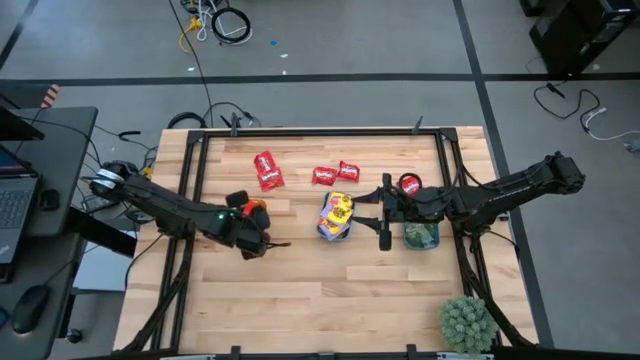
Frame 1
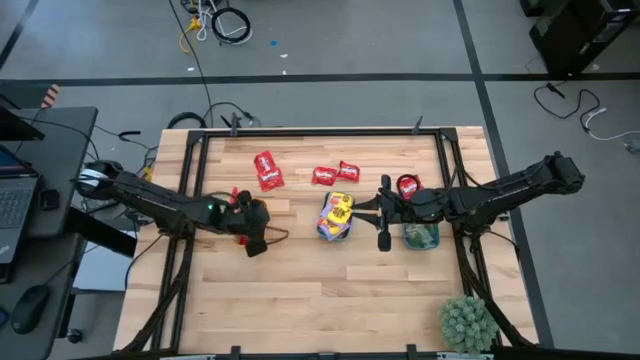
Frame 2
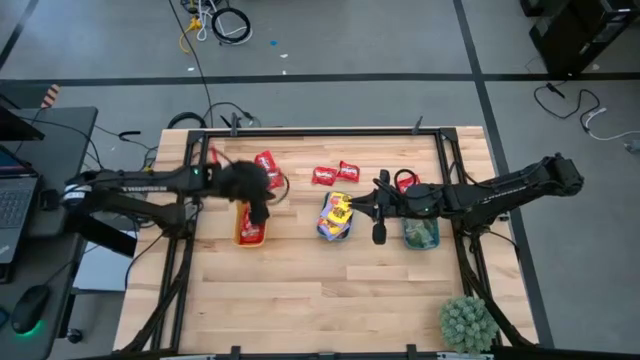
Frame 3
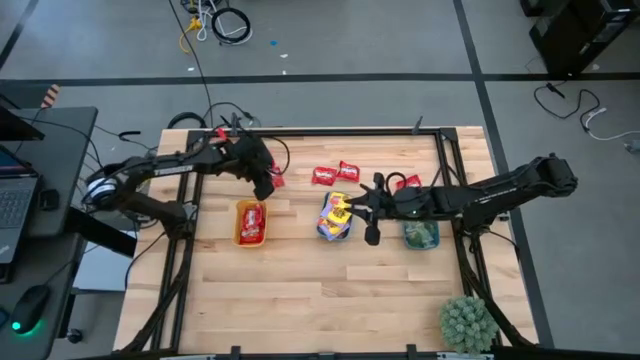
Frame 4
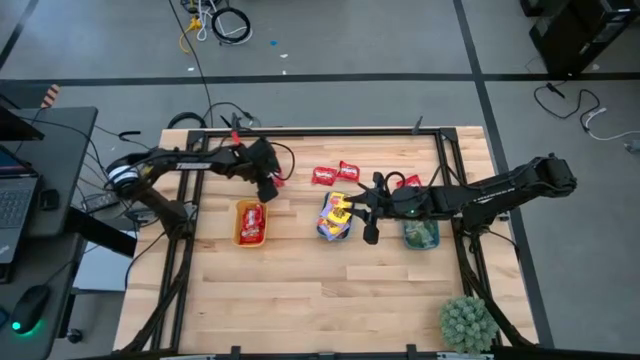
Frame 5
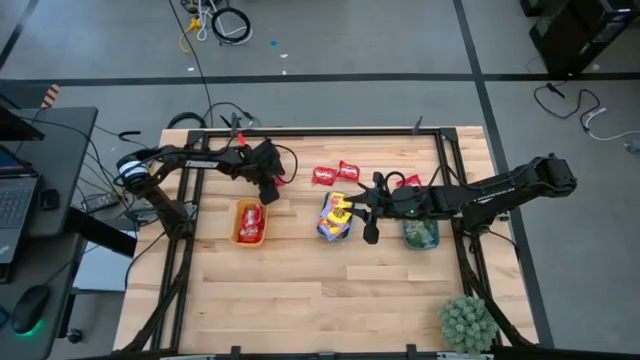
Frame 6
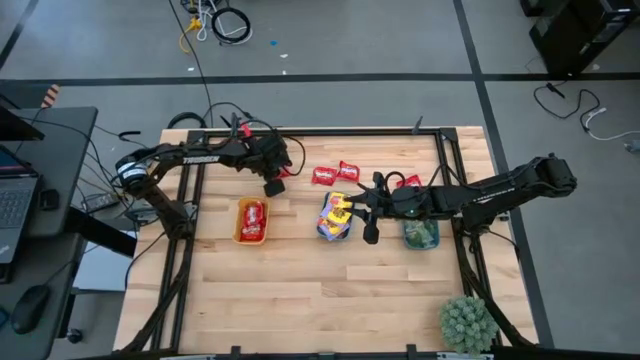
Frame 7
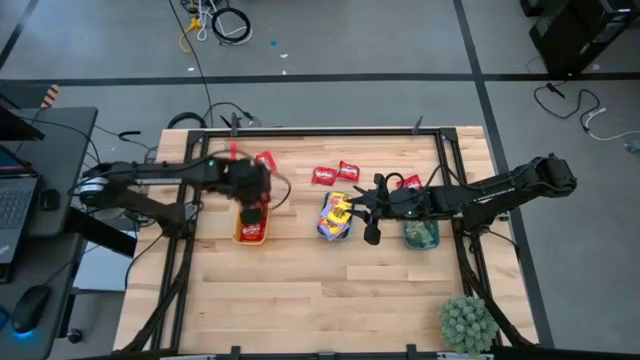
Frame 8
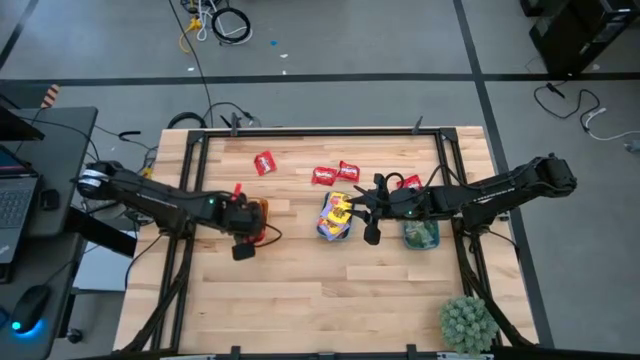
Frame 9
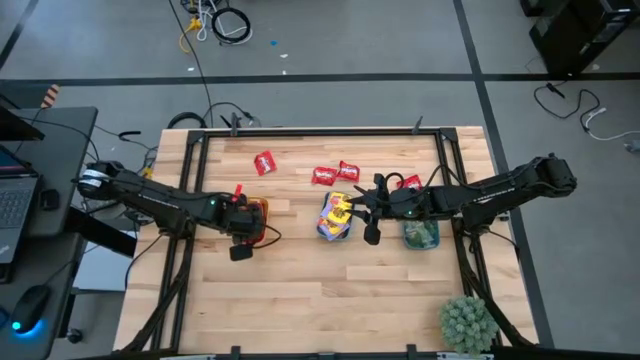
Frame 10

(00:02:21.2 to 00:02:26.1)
Task: Sort candy
Put the red candy pack into the yellow bin

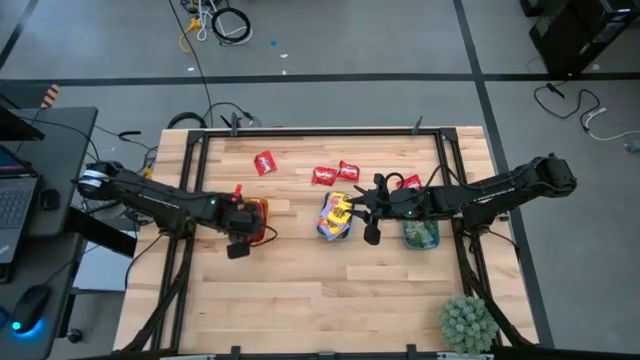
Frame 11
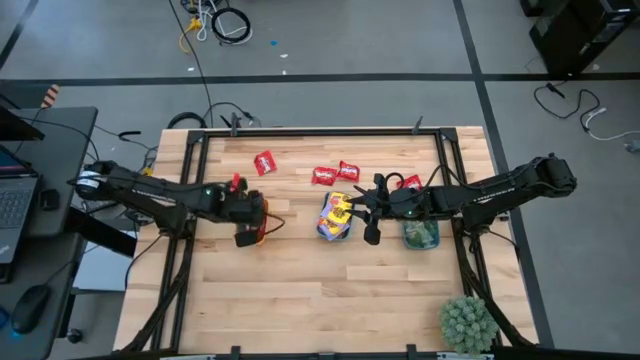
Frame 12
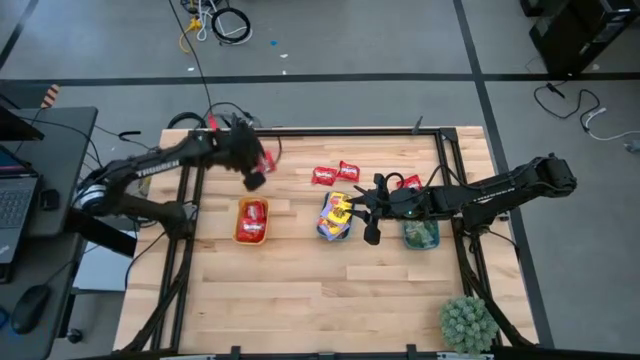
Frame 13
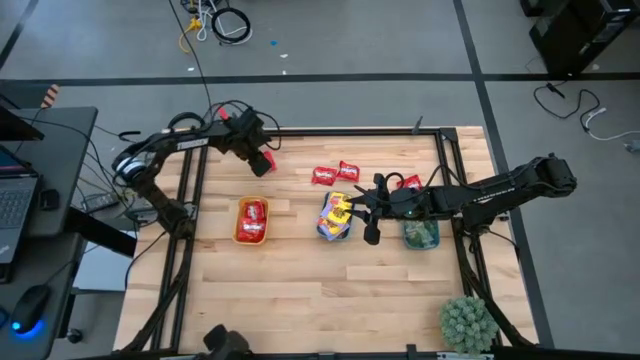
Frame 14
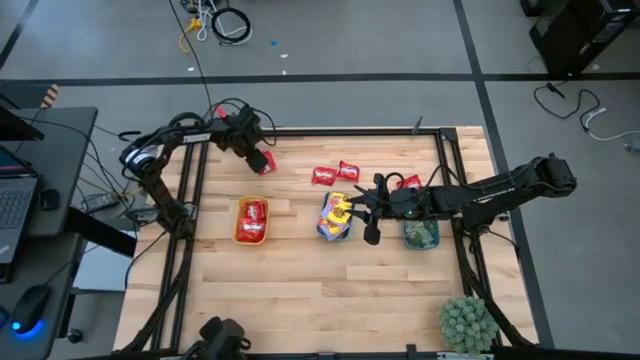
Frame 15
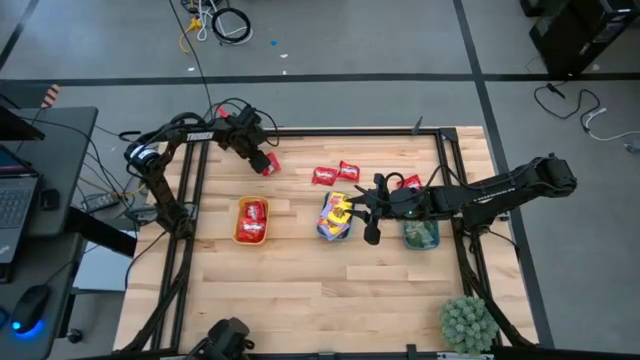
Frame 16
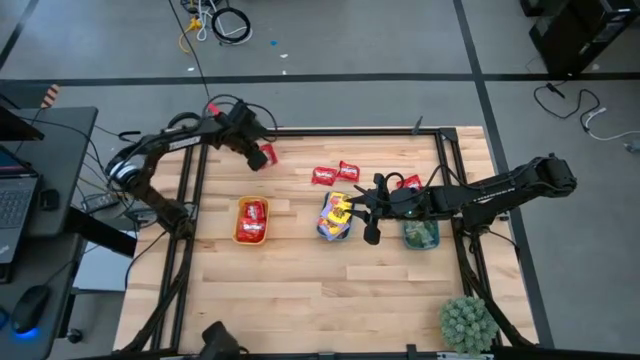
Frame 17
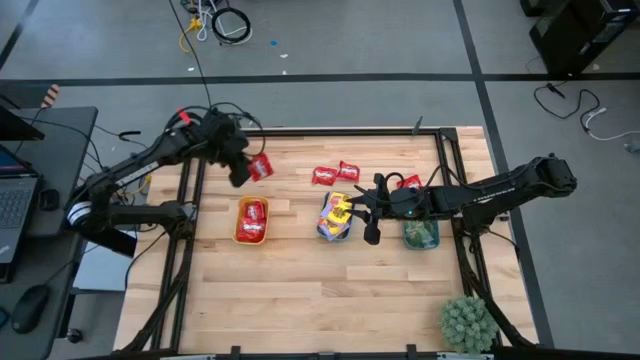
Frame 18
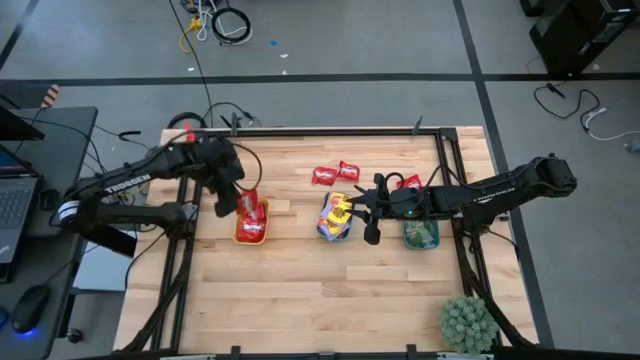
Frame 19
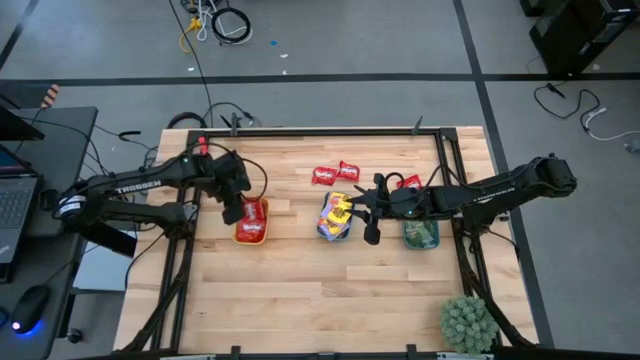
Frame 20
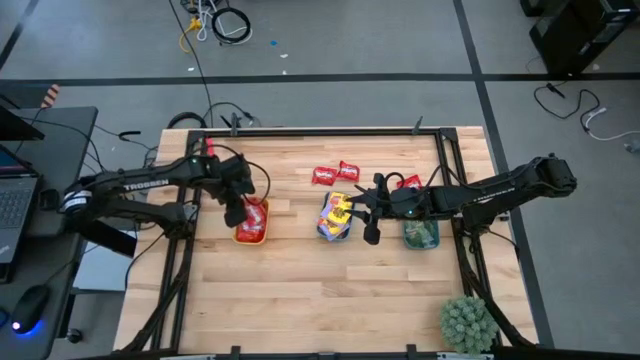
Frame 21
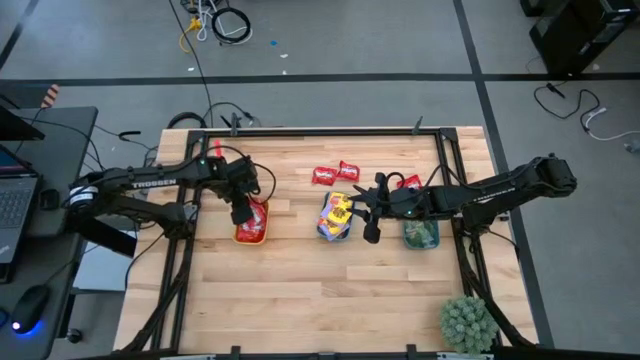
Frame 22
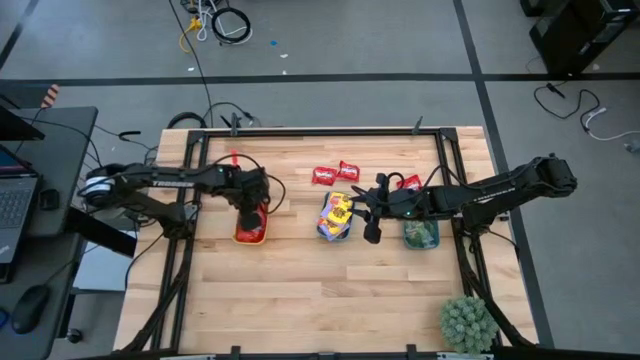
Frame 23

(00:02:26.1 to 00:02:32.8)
Put the red candy pack into the yellow bin

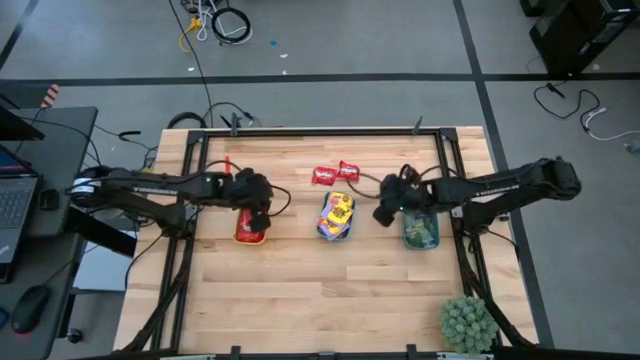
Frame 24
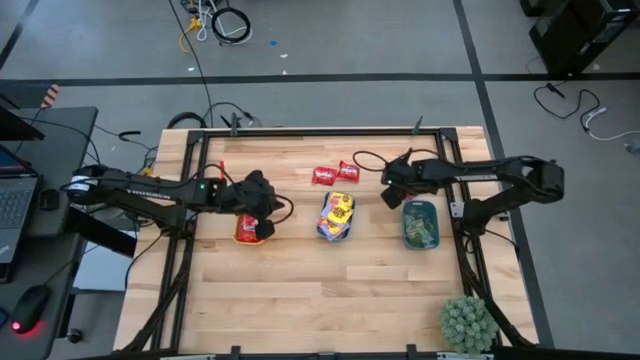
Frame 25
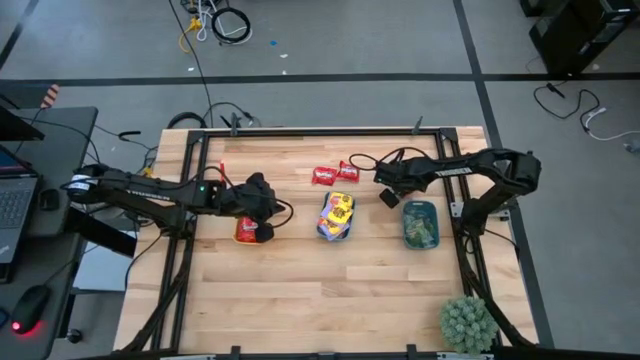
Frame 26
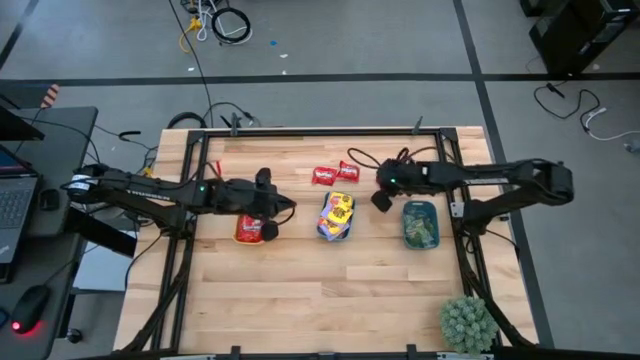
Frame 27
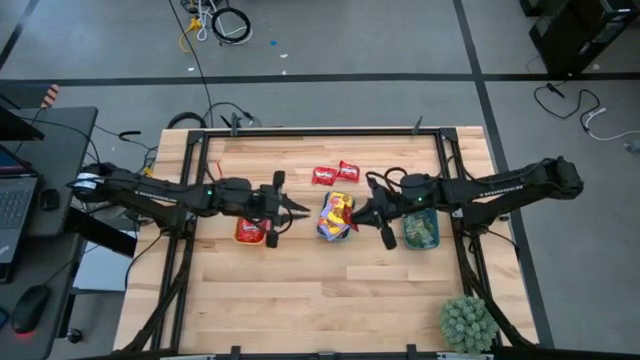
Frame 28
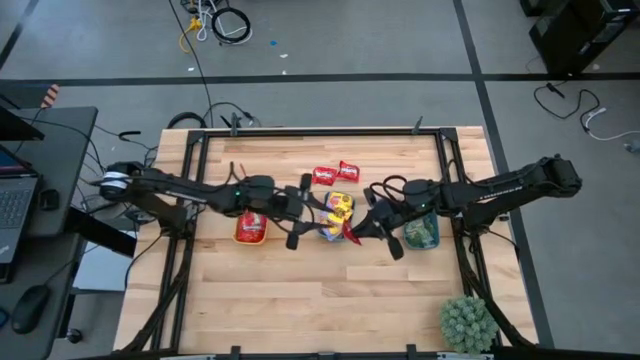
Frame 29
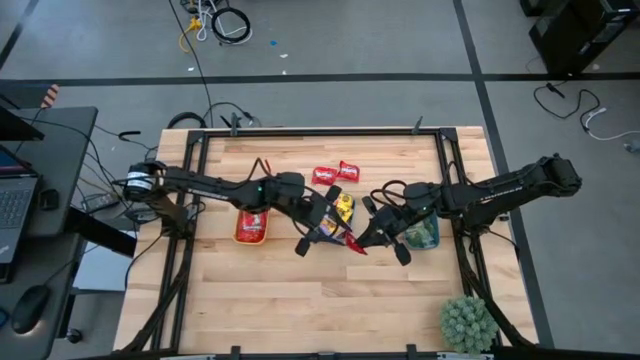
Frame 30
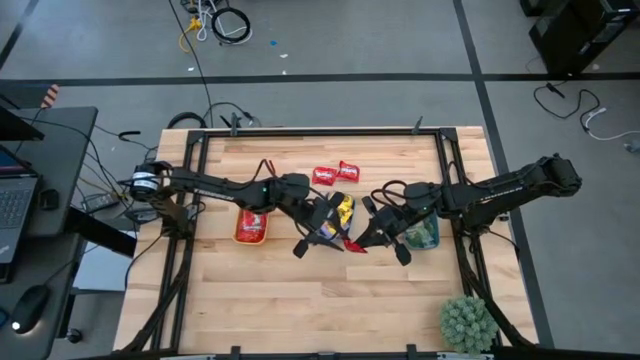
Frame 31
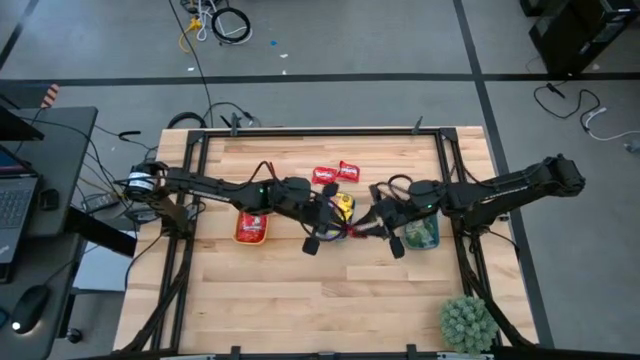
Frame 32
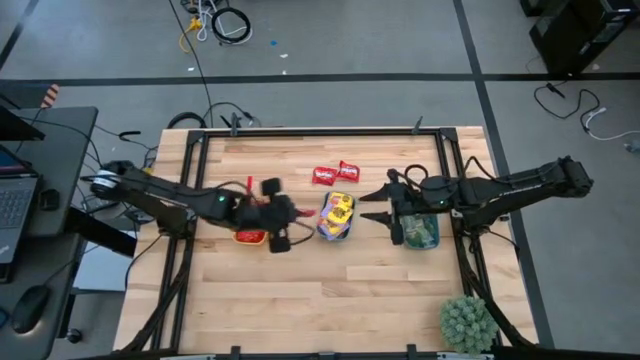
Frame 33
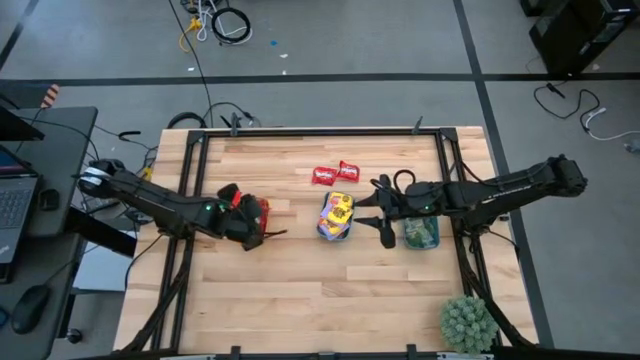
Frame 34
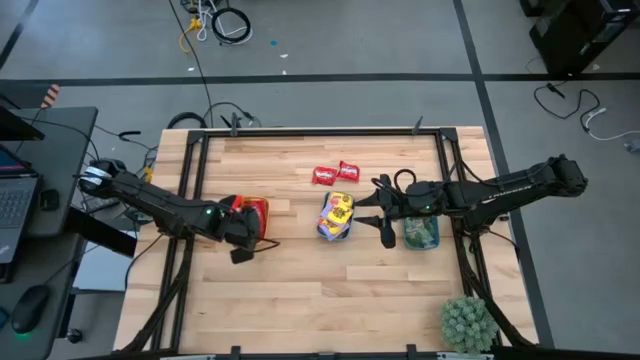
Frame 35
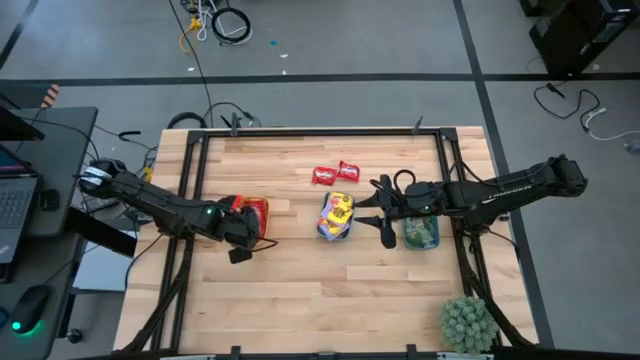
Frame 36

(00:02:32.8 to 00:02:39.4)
Put the red candy pack into the yellow bin

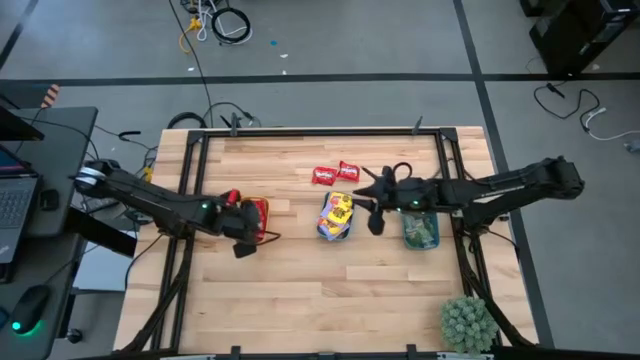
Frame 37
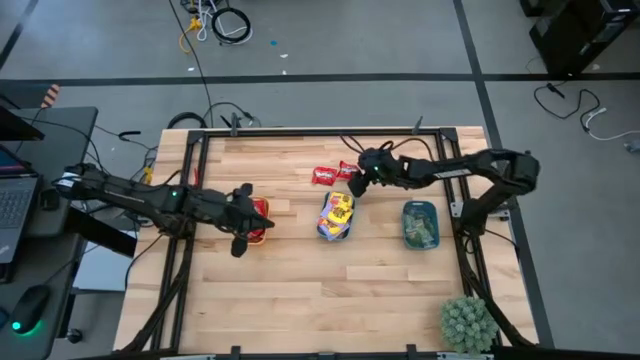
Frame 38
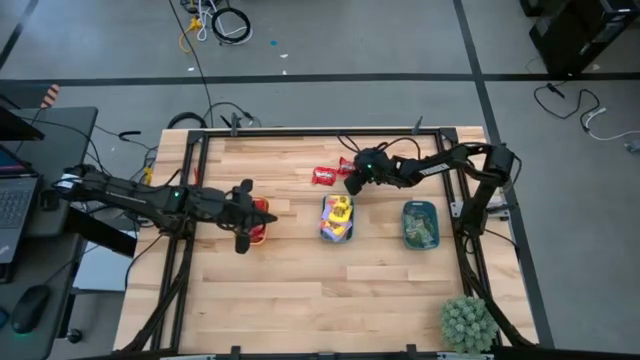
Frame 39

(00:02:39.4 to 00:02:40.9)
Put the red candy pack into the yellow bin
